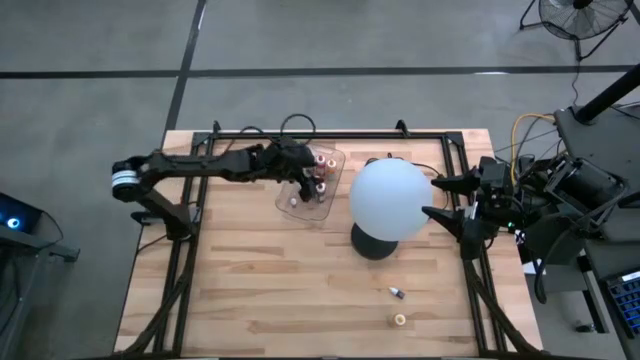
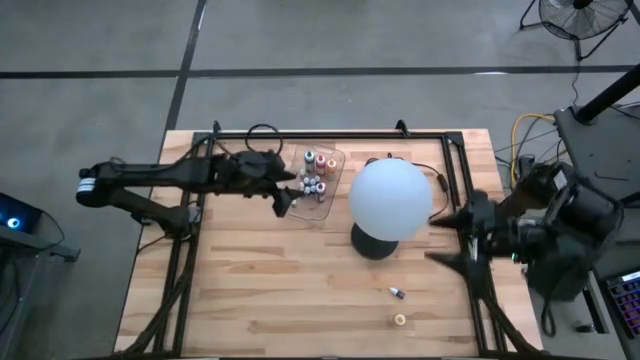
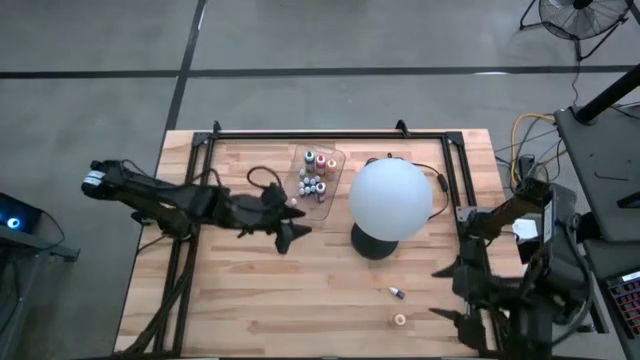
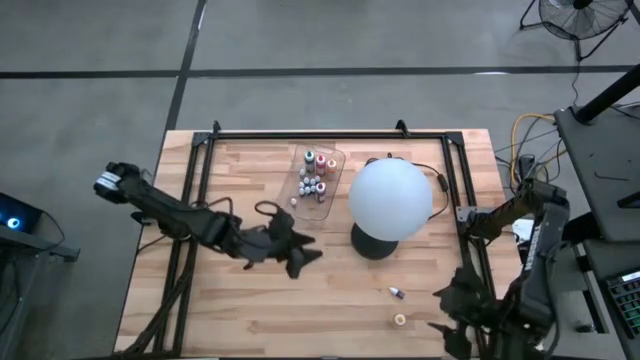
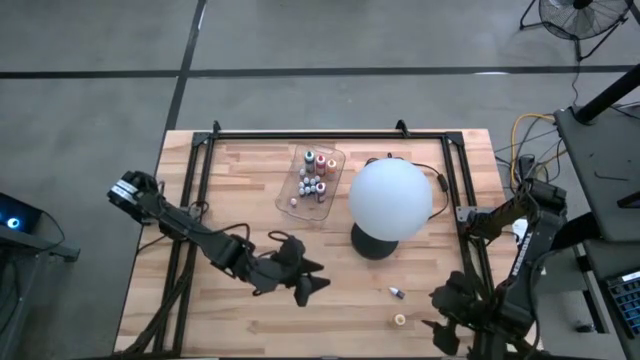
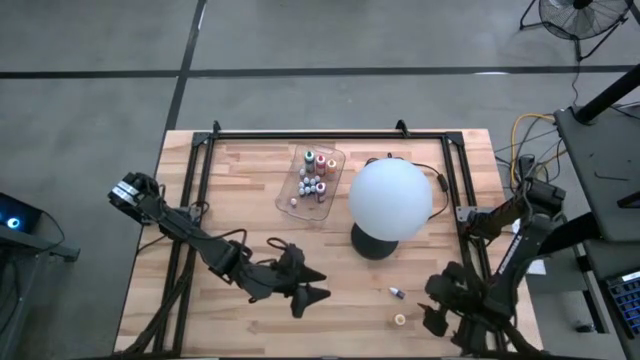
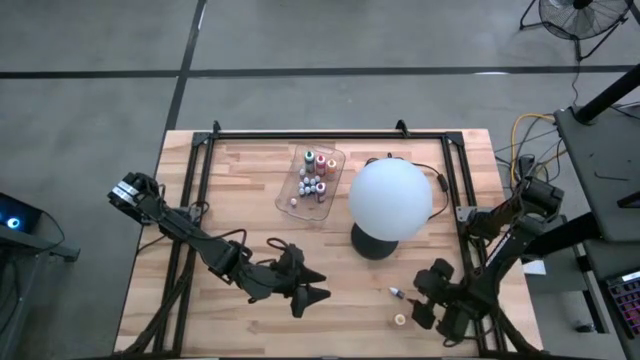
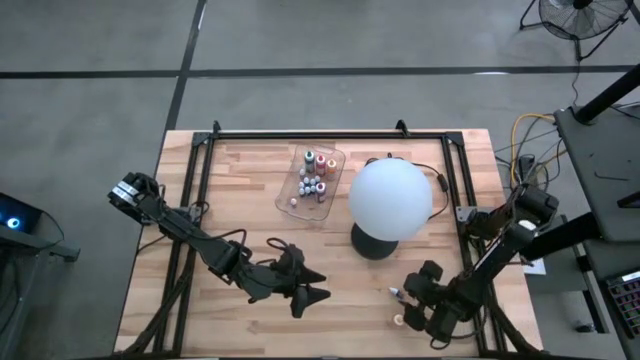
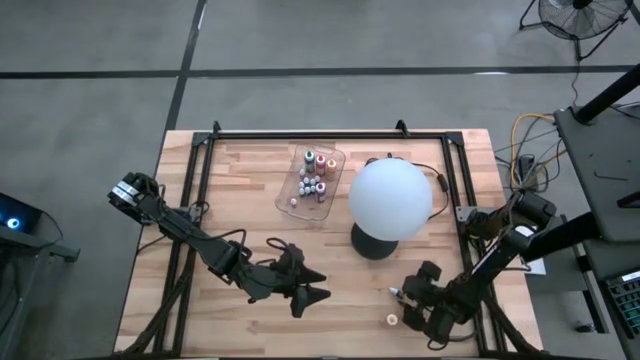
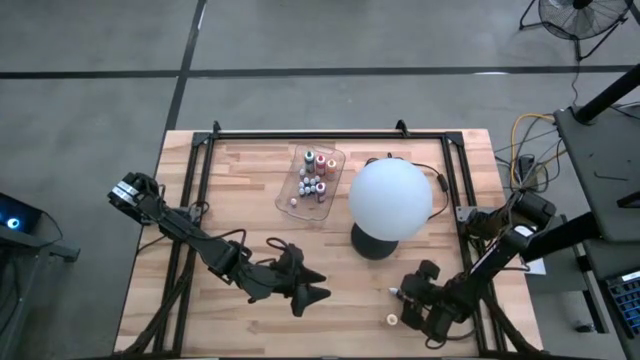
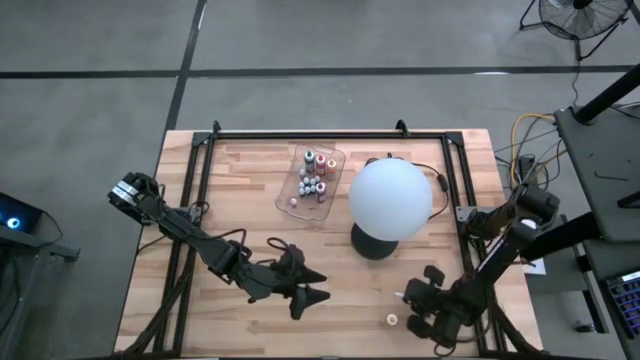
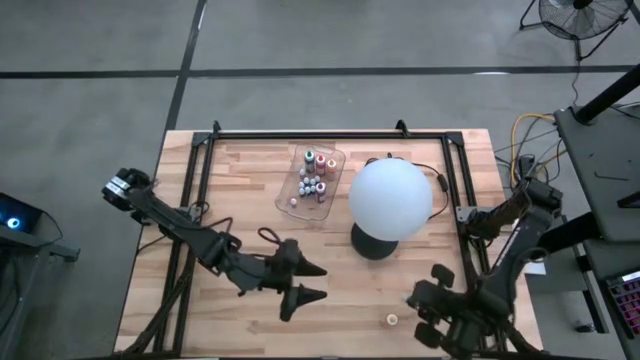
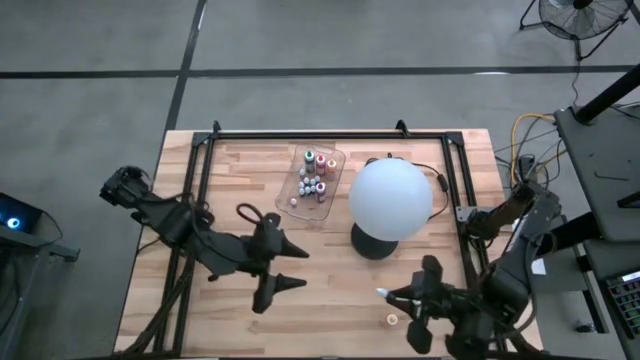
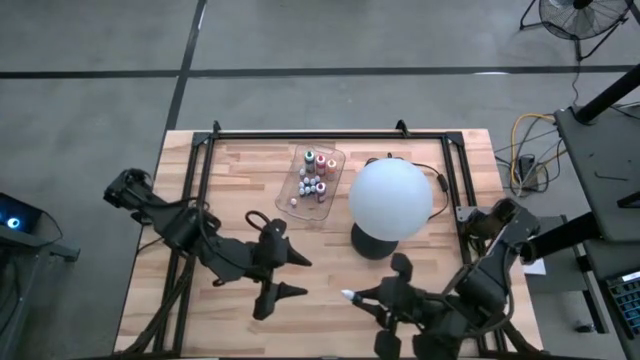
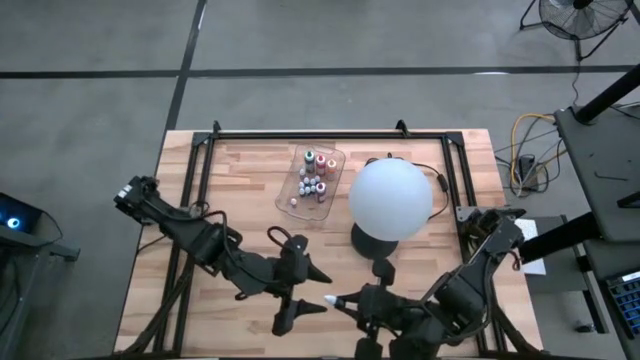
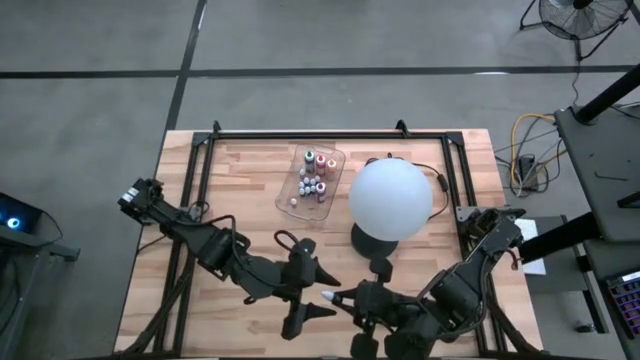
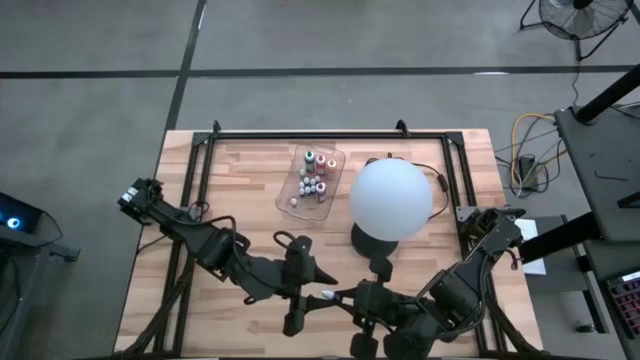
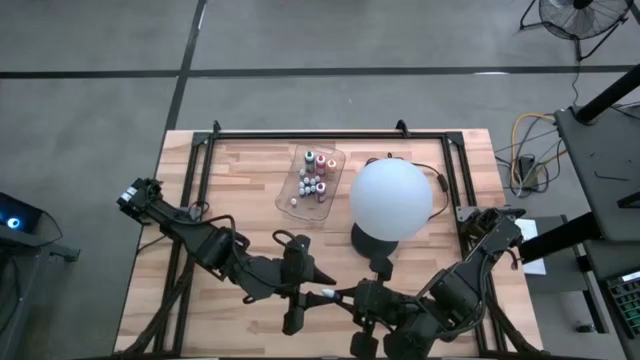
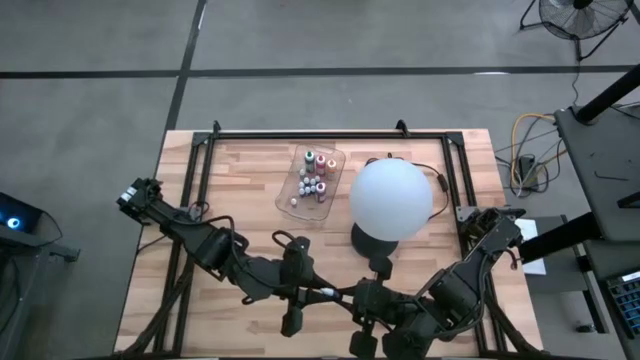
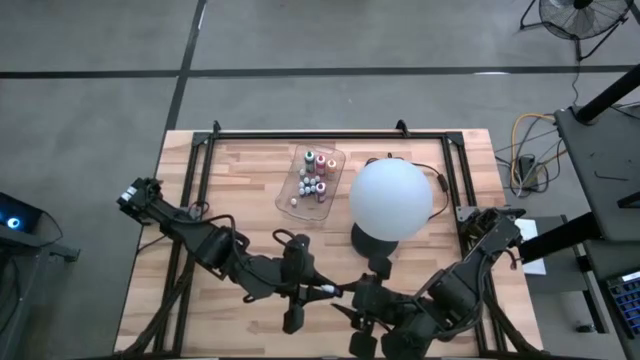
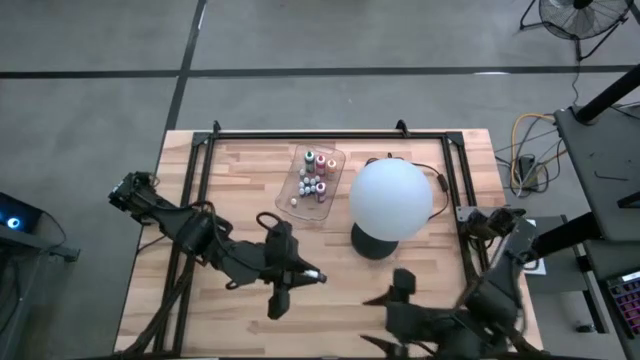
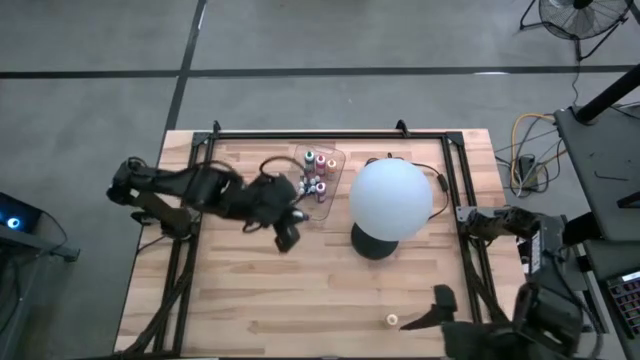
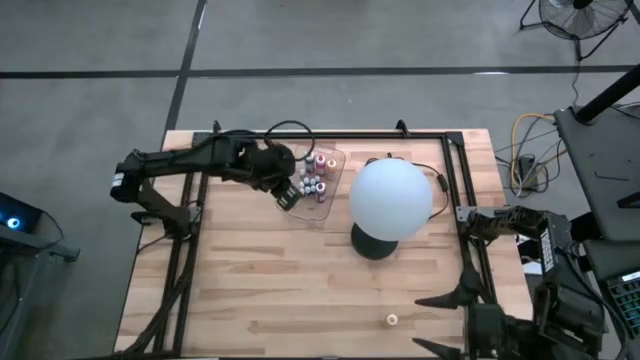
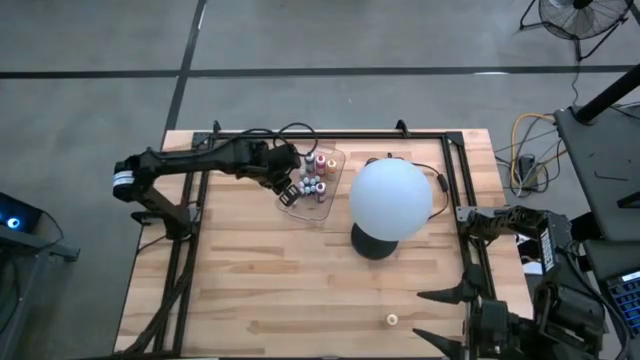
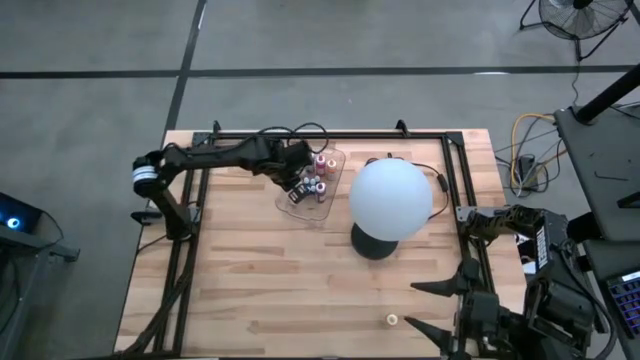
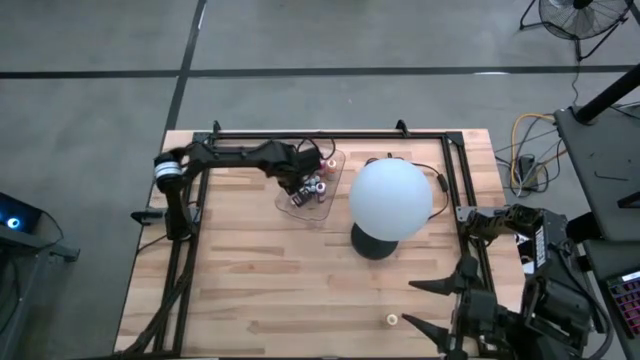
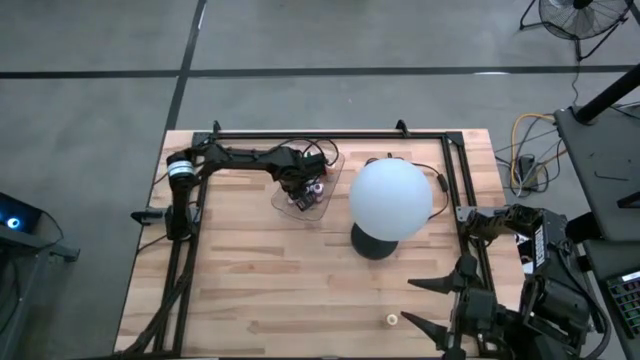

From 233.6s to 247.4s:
Task: Pick & Place food coloring
Put the small black food coloring bottle into the transparent bin

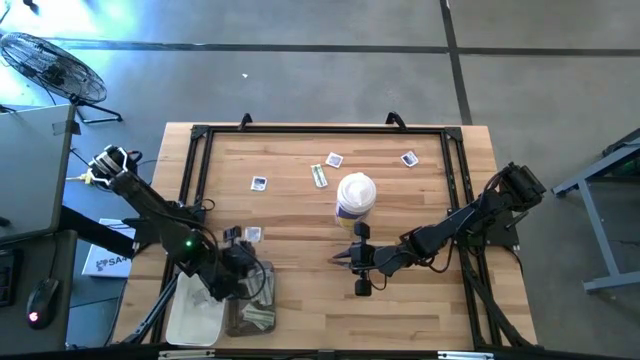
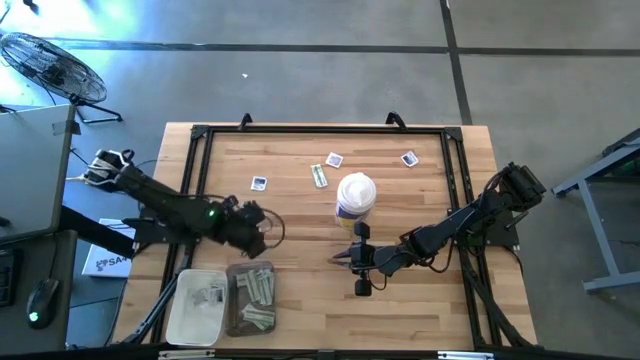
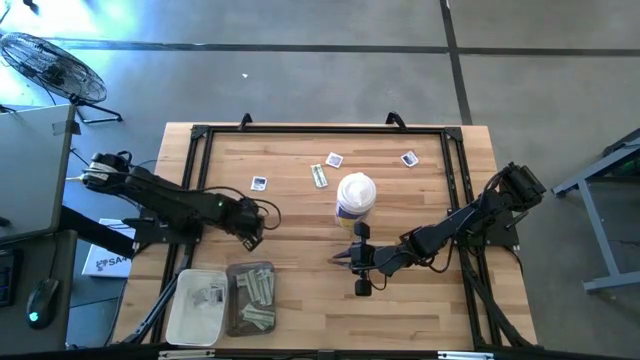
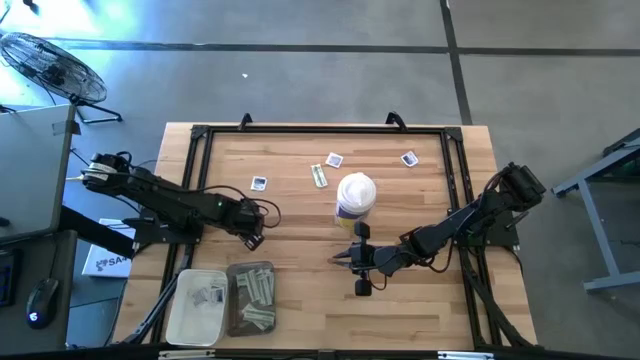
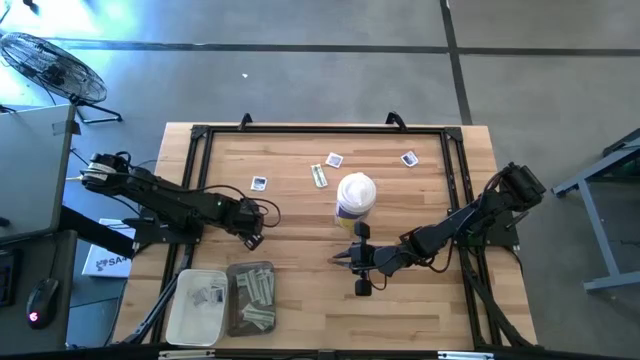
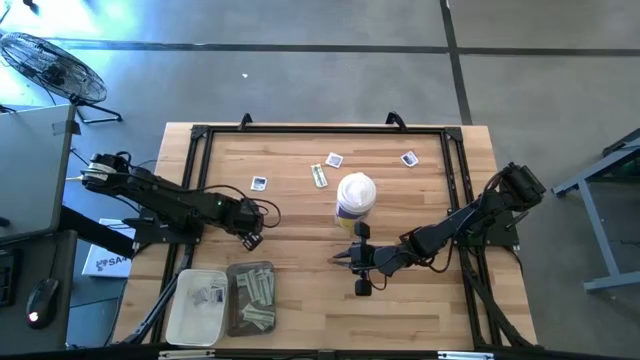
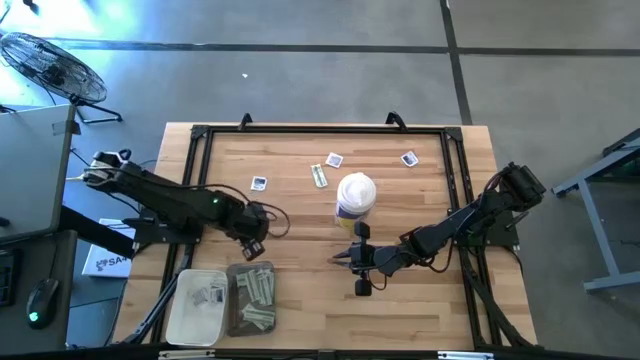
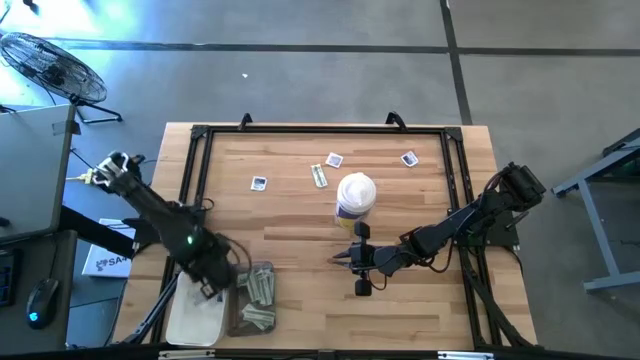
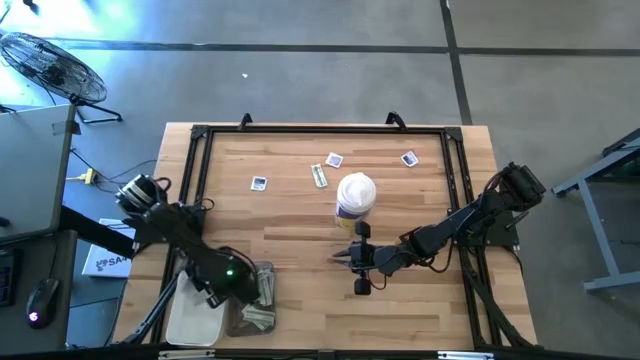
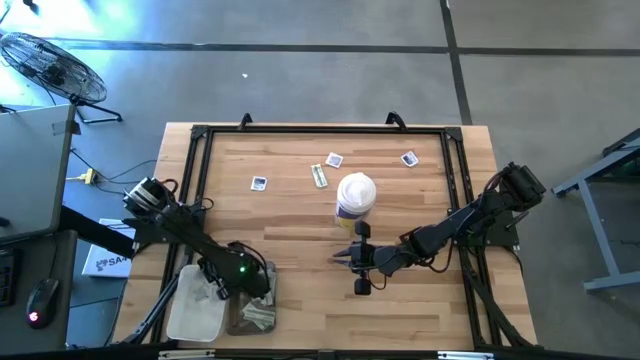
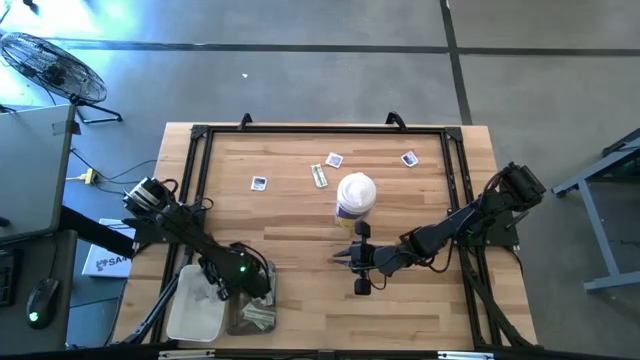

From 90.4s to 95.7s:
Task: Pick & Place First Aid Supplies
Put the alcohol pad into the white bin

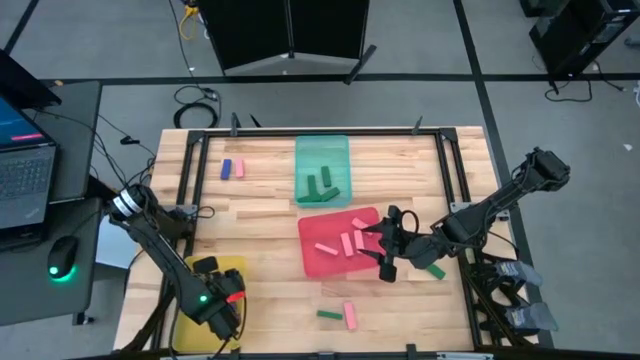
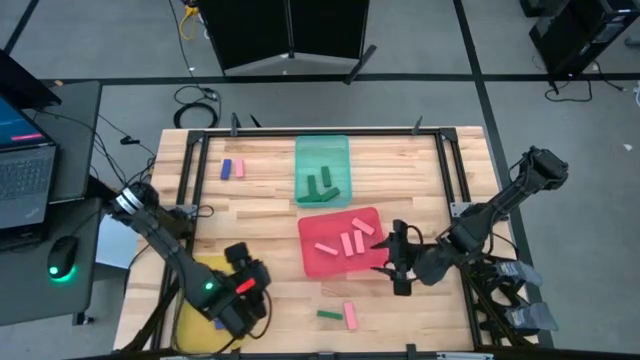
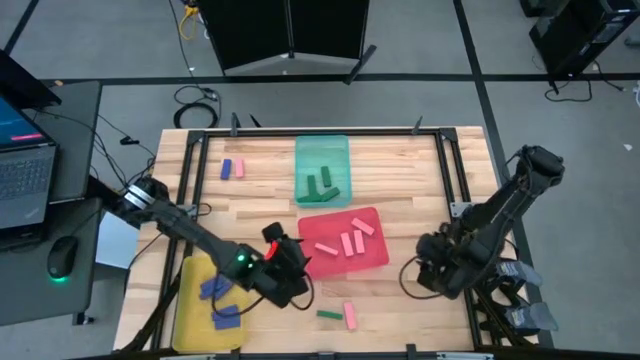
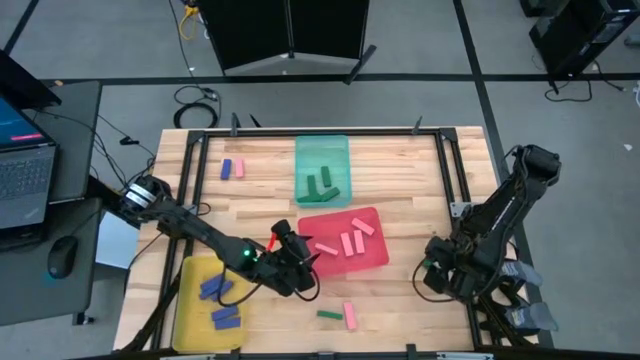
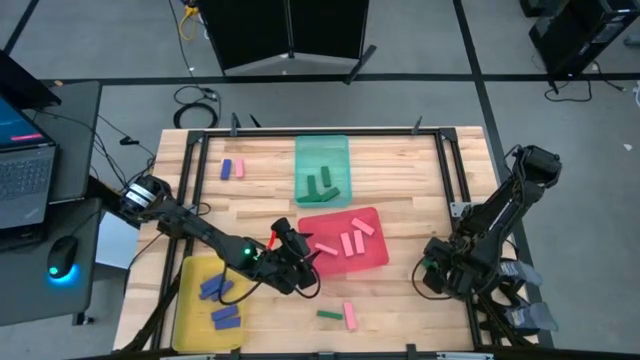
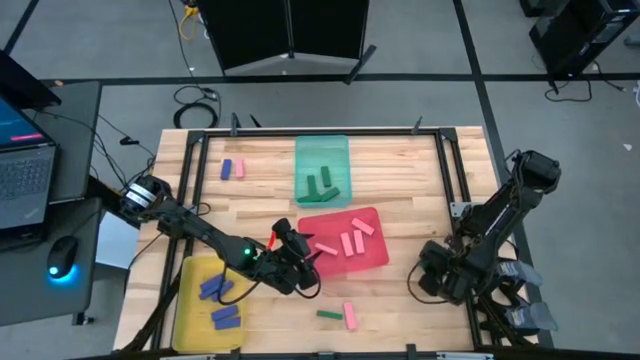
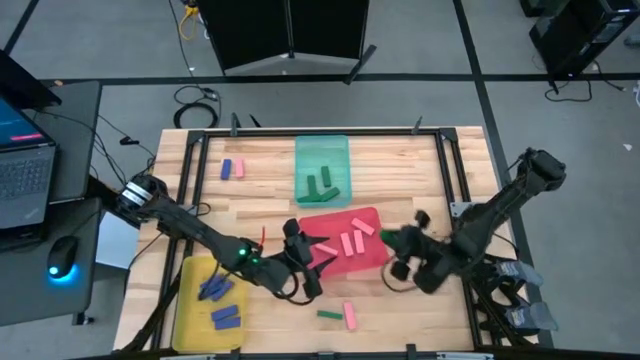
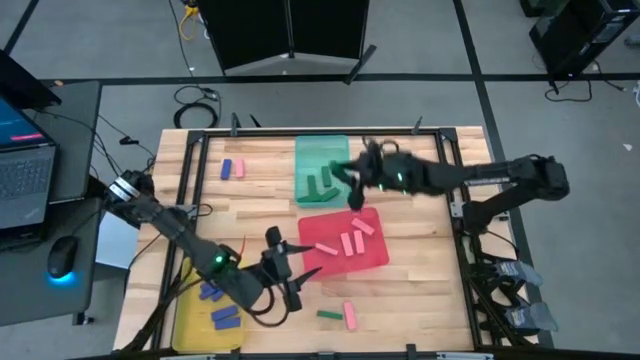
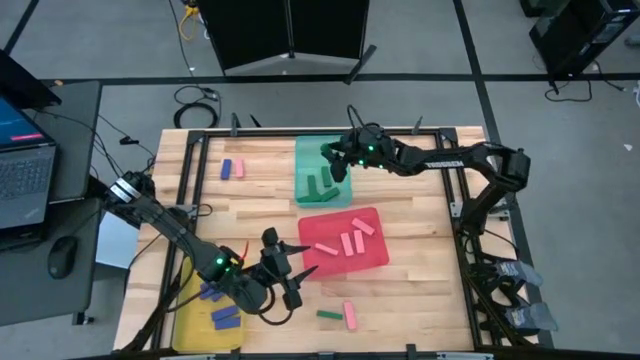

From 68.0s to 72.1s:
Task: Sort blocks
Put the green block into the green bin
